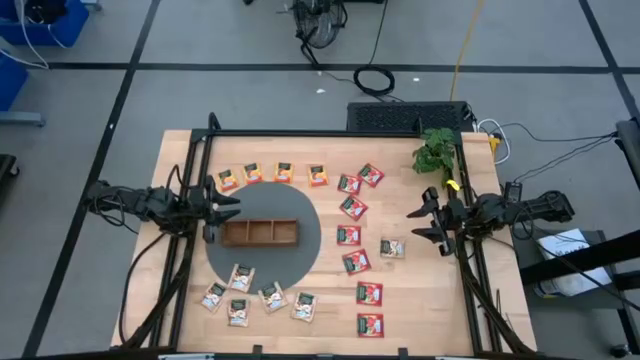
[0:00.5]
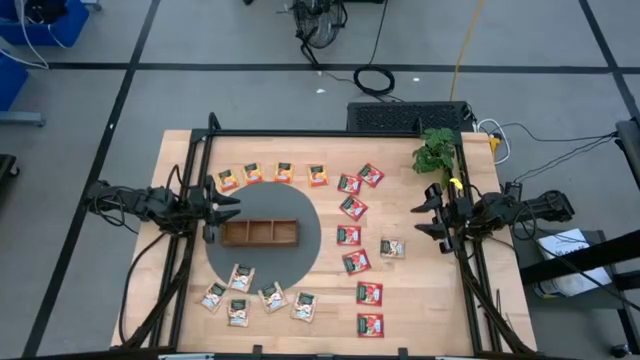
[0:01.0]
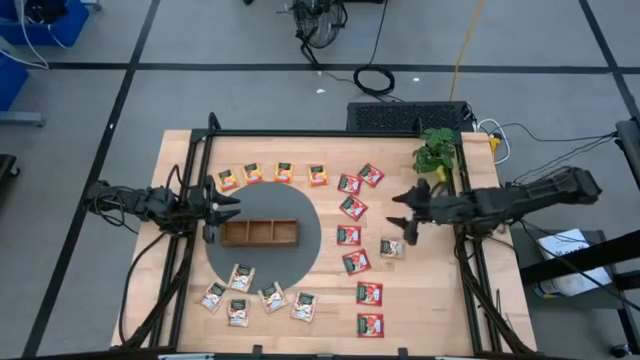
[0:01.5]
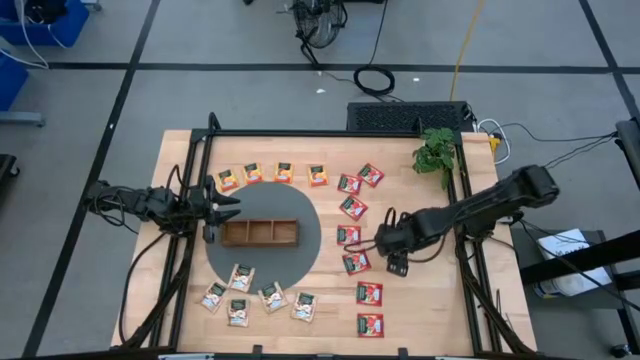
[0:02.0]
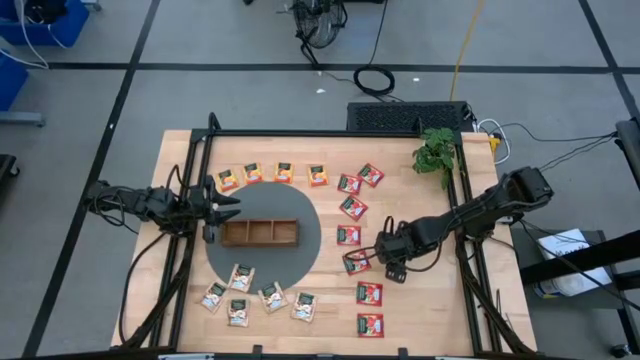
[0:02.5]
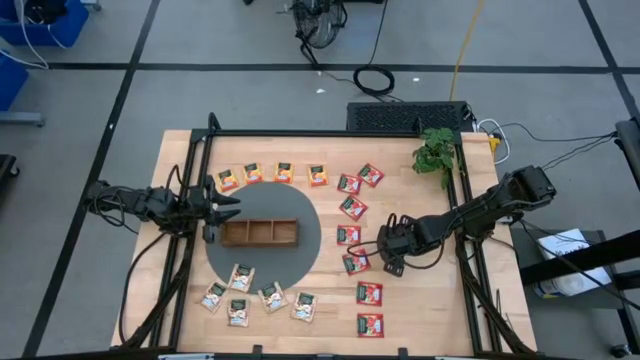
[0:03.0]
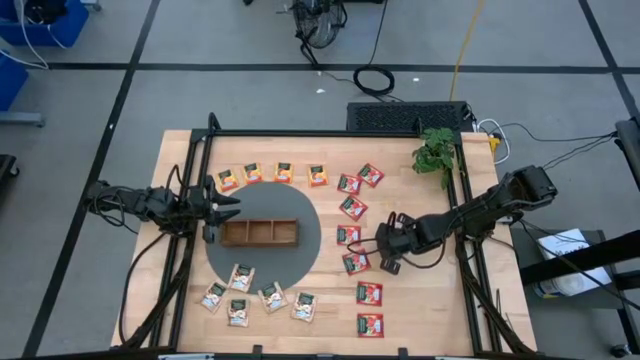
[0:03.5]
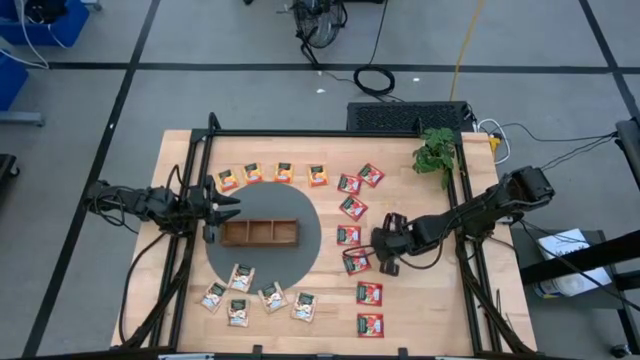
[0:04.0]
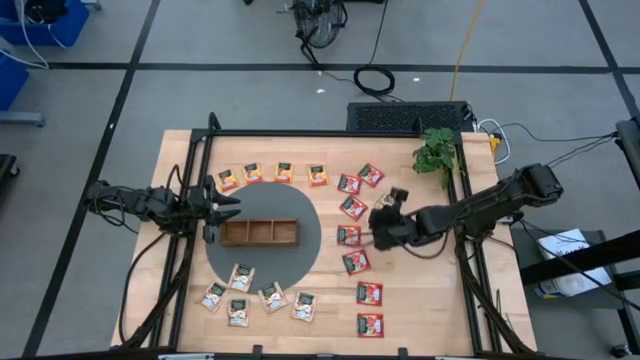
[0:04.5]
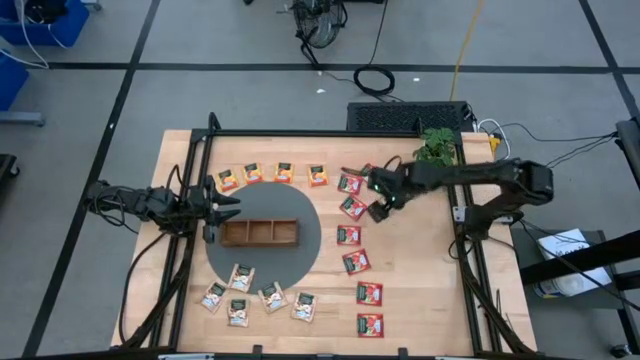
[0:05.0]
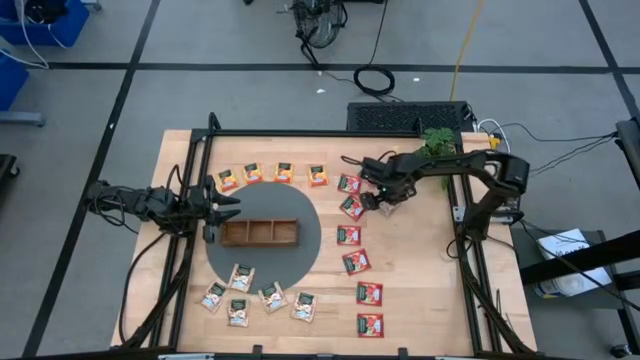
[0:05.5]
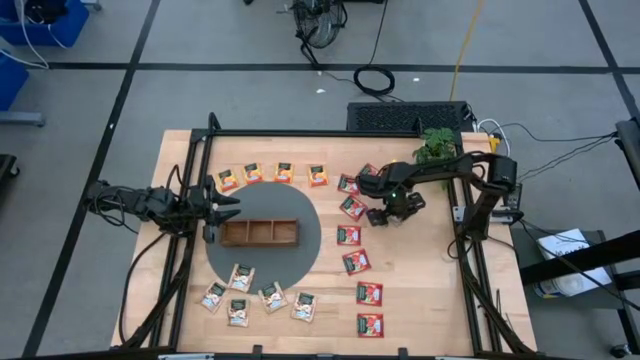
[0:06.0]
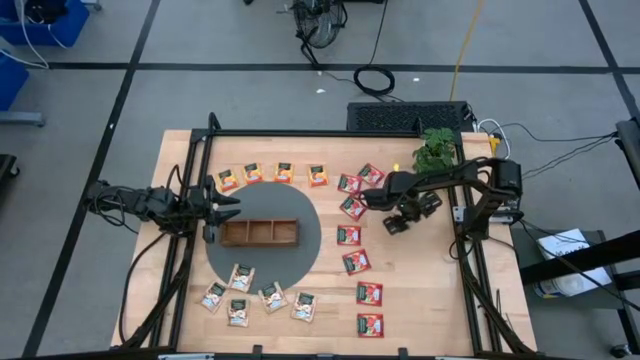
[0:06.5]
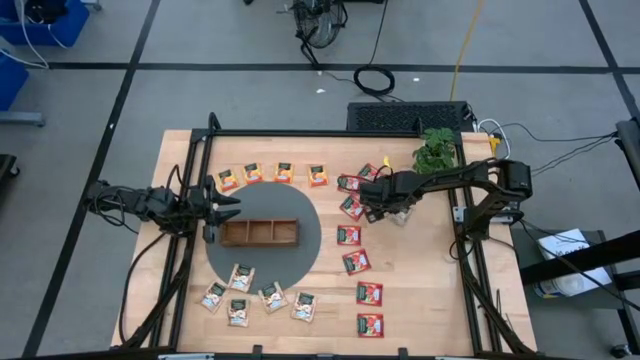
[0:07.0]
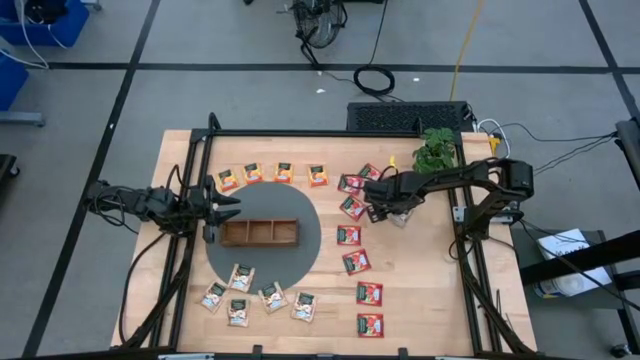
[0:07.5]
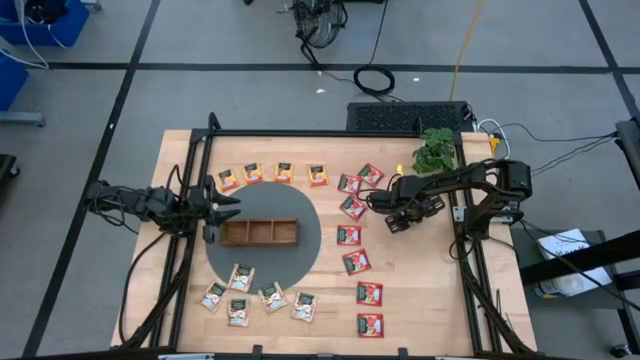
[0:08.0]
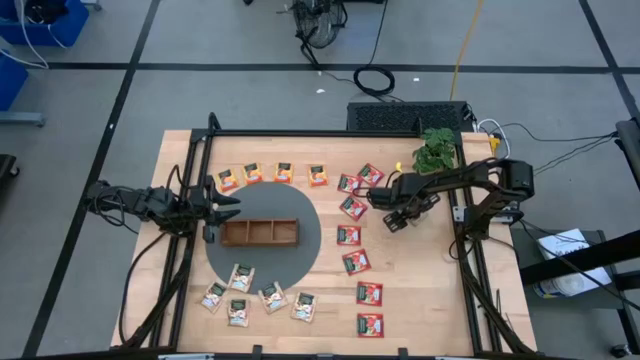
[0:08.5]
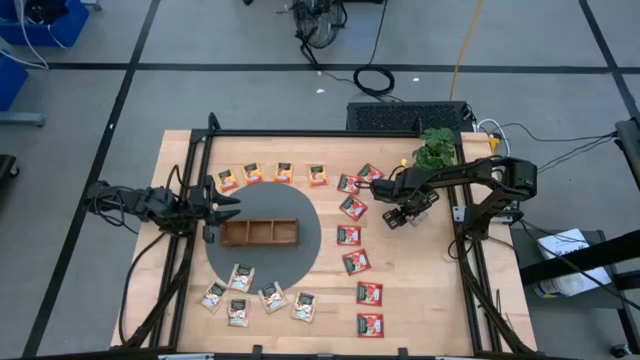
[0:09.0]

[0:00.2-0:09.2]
Task: Pick & Place Tea
Put the brown tea bag into the left section of the wooden organizer

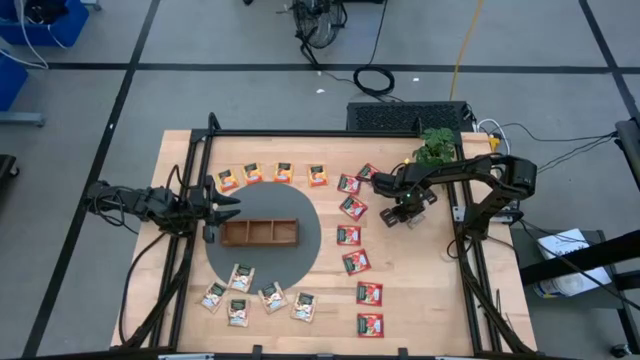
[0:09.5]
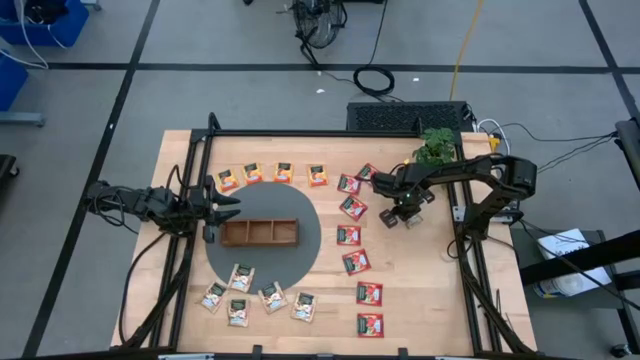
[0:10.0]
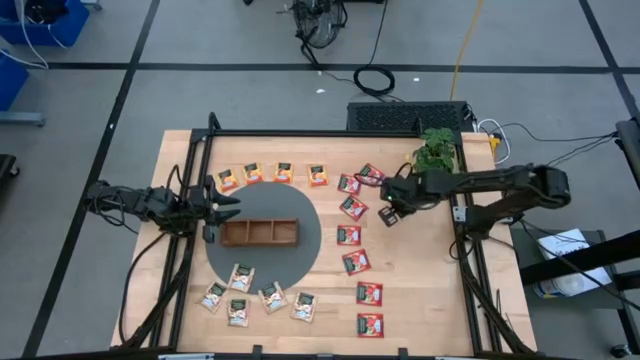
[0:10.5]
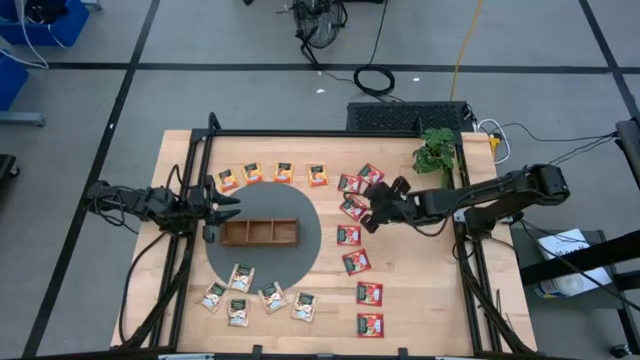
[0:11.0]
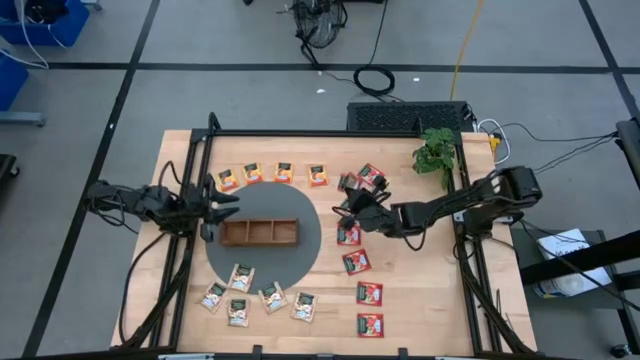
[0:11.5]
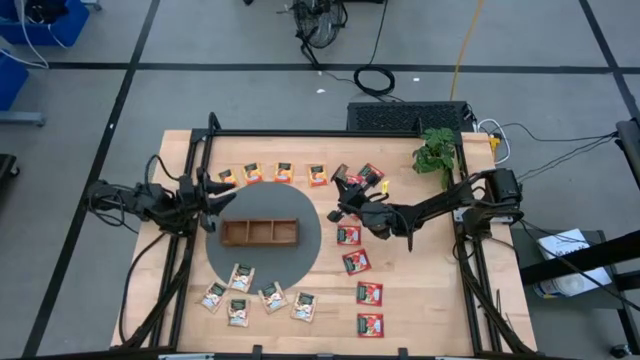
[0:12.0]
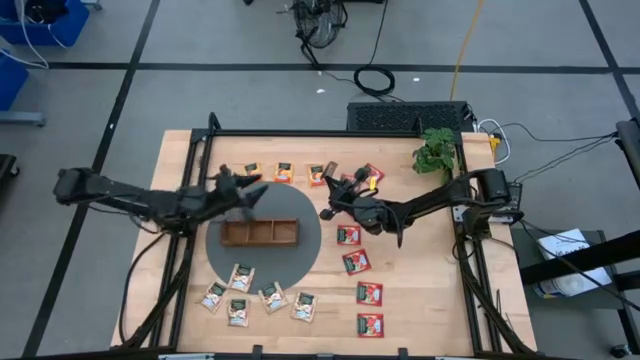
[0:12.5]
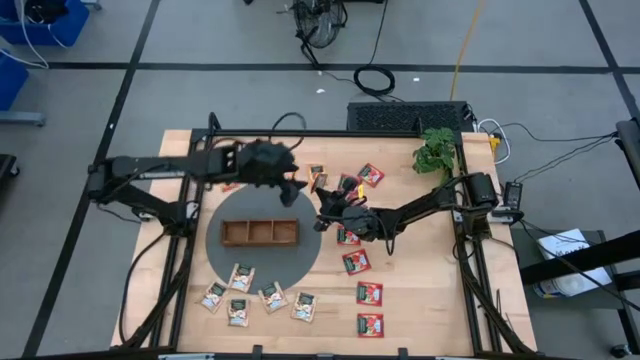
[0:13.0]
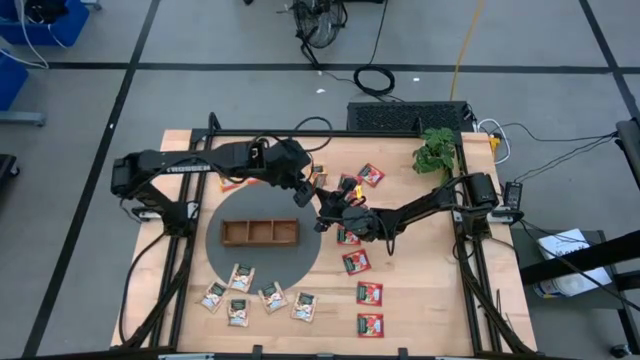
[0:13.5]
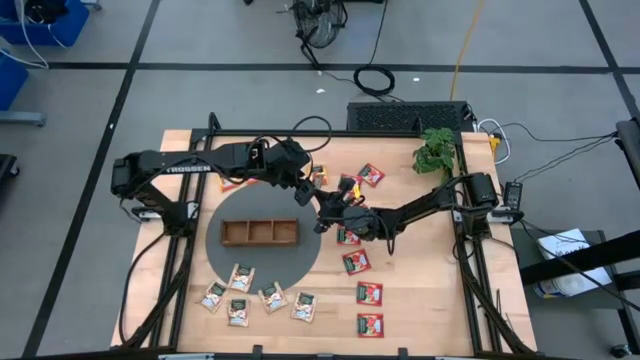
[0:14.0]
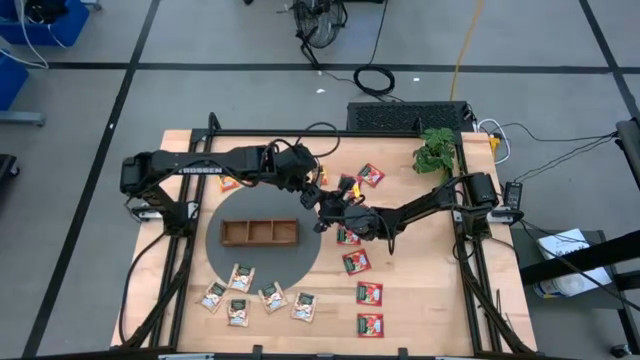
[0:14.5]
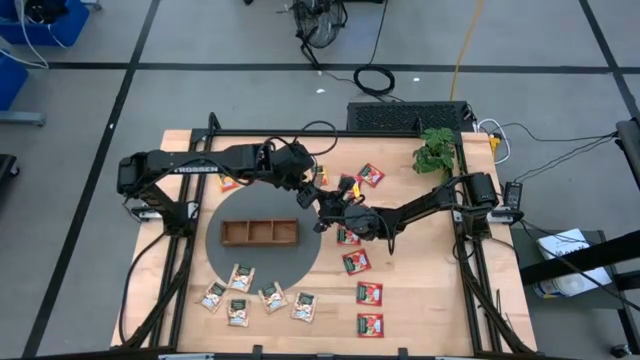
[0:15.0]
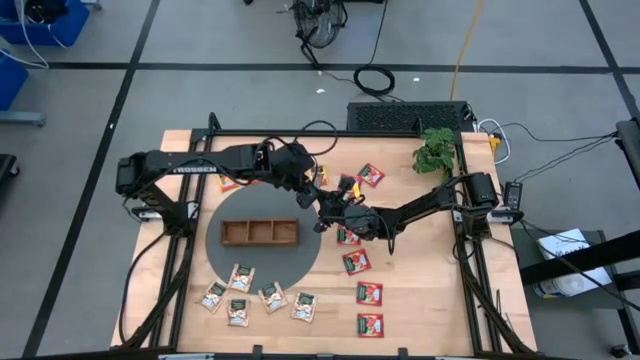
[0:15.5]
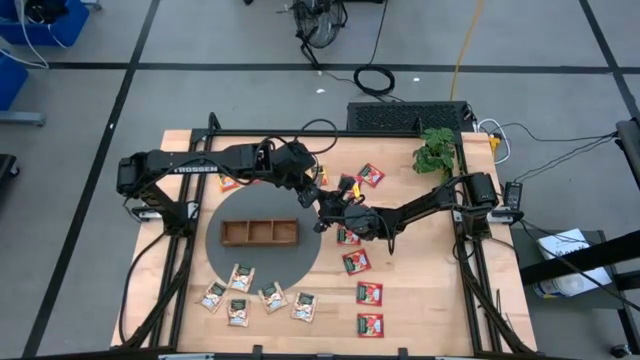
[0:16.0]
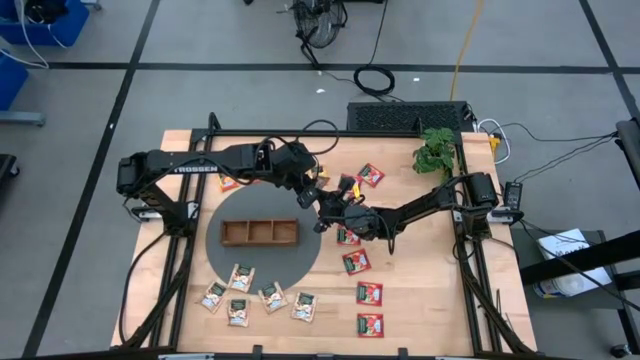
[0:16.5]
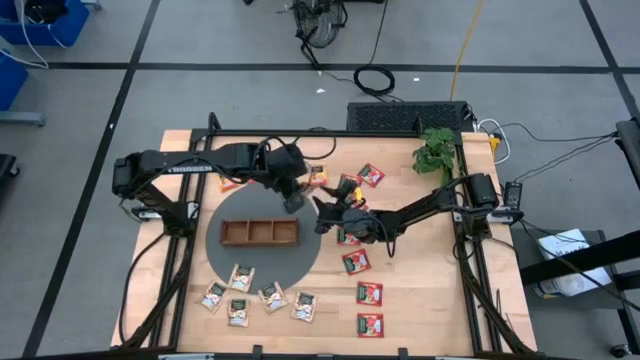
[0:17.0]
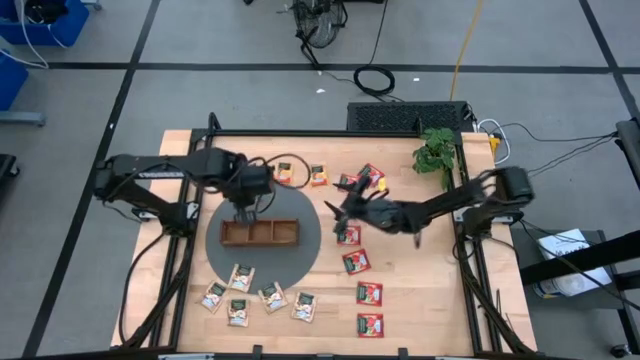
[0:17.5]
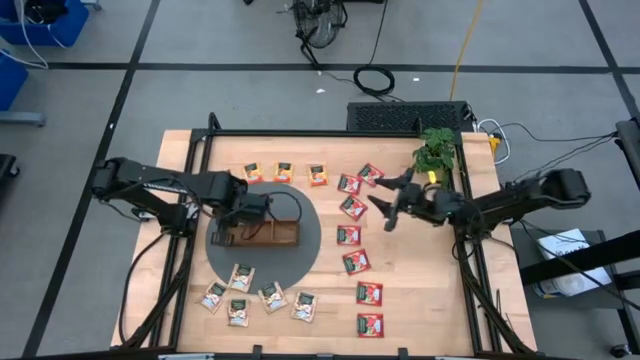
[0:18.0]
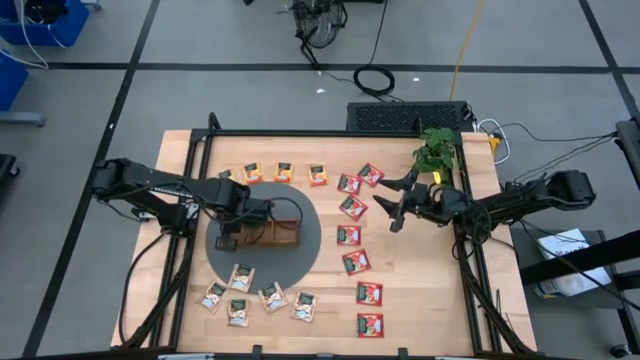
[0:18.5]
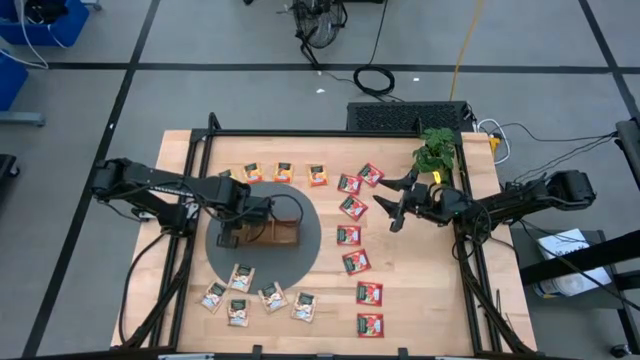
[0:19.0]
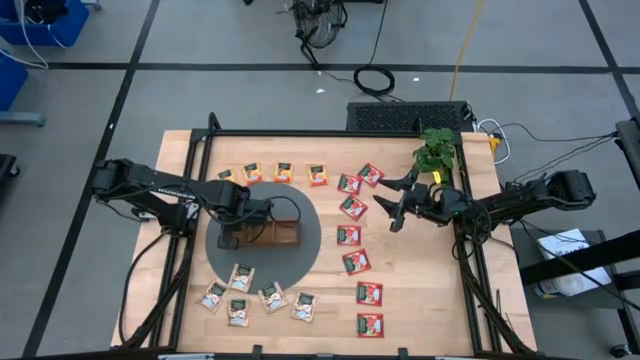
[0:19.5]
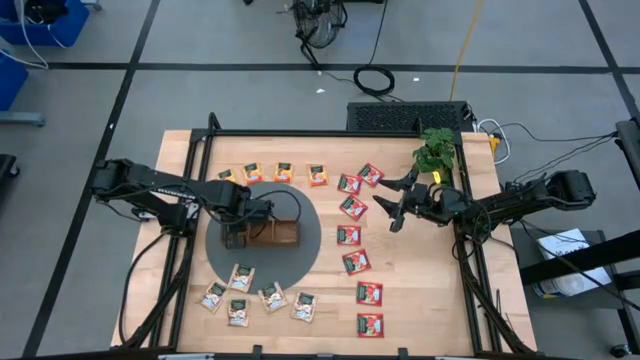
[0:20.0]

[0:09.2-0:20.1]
Put the brown tea bag into the left section of the wooden organizer

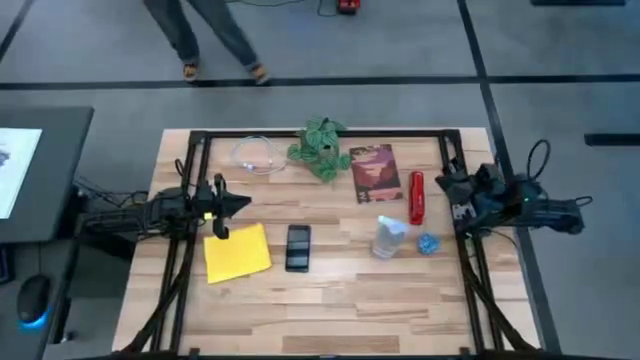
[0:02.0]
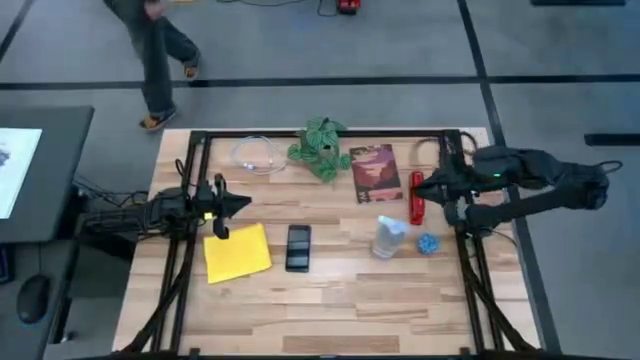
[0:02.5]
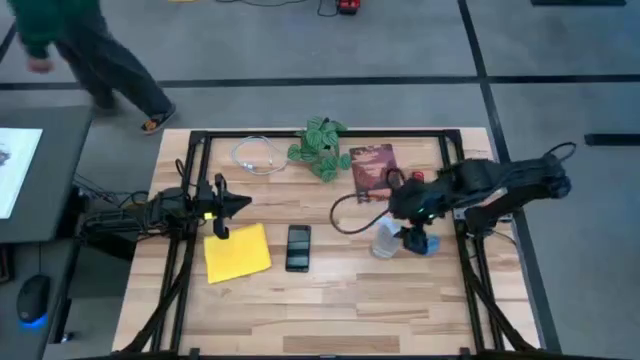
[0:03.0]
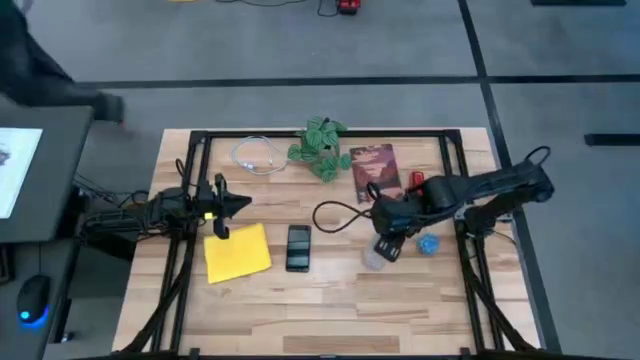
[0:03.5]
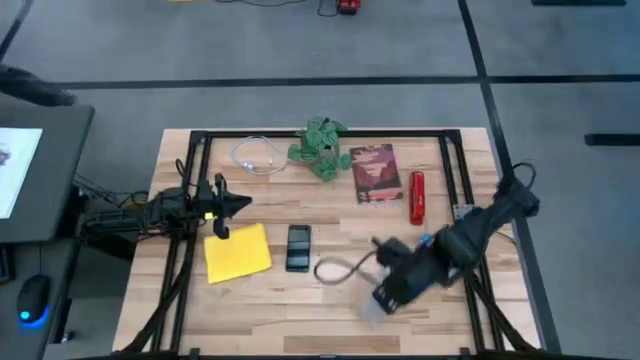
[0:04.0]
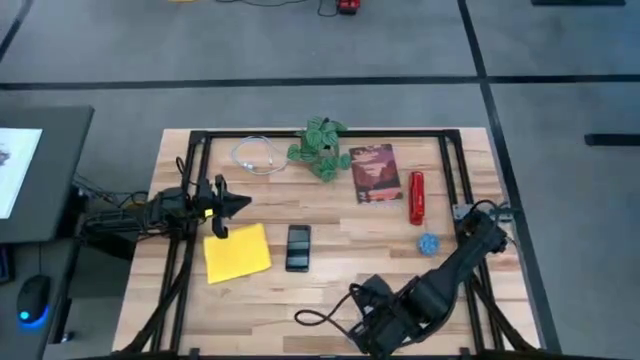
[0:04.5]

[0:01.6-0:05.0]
Task: Apply microfiber cloth
Move the spray cleaning bottle to the bottom
